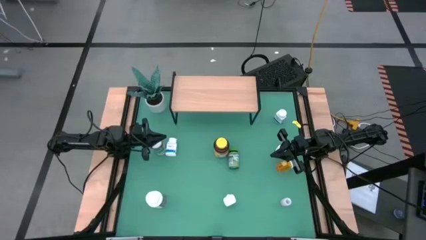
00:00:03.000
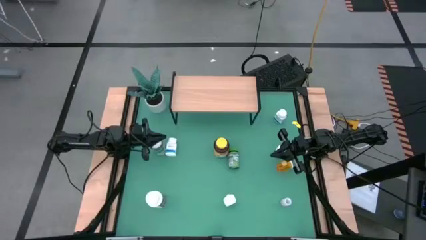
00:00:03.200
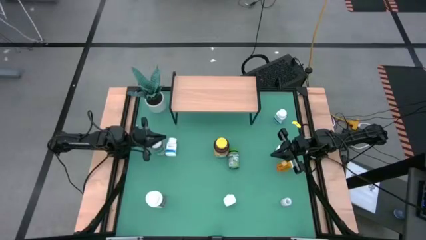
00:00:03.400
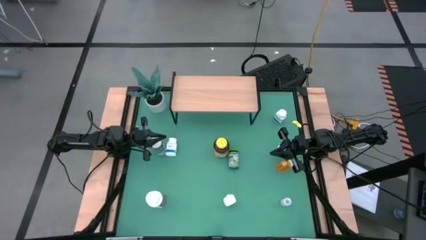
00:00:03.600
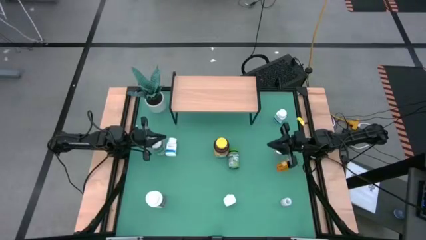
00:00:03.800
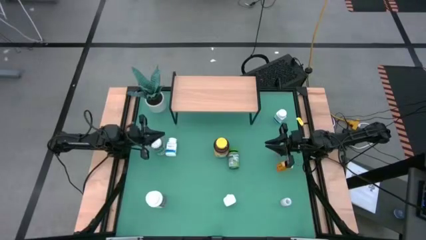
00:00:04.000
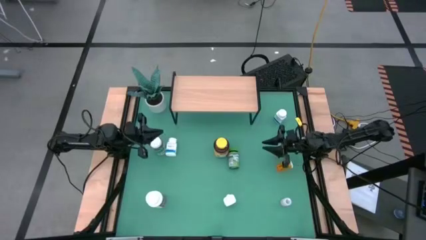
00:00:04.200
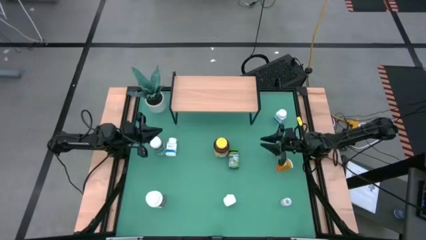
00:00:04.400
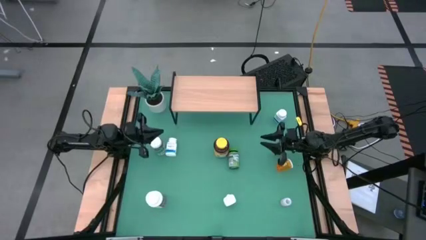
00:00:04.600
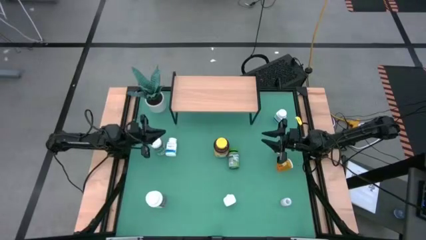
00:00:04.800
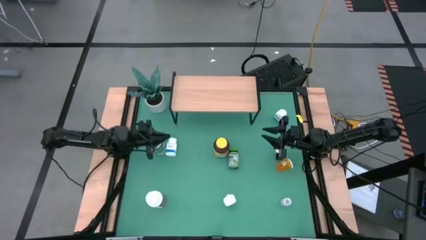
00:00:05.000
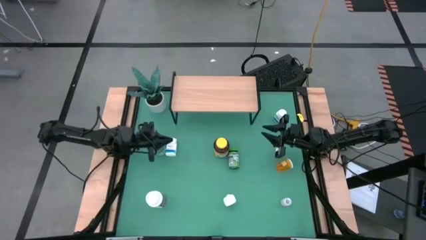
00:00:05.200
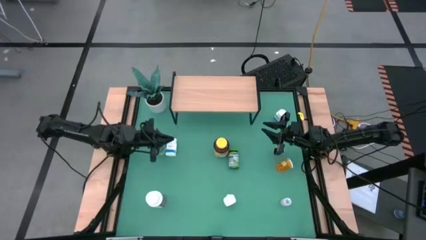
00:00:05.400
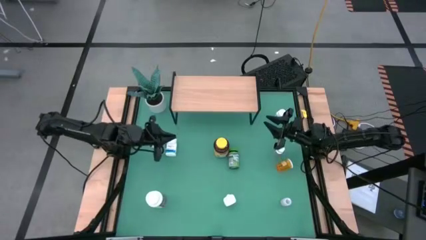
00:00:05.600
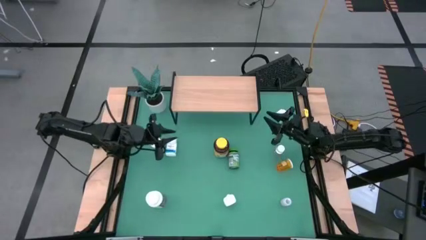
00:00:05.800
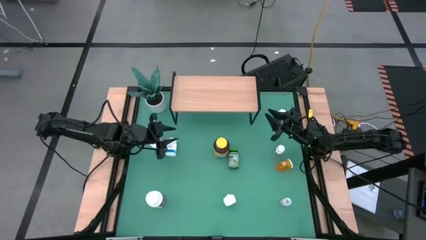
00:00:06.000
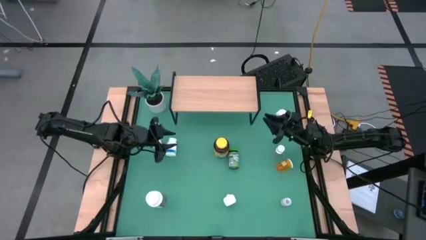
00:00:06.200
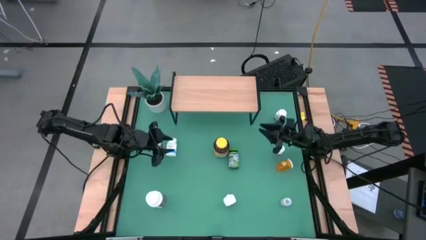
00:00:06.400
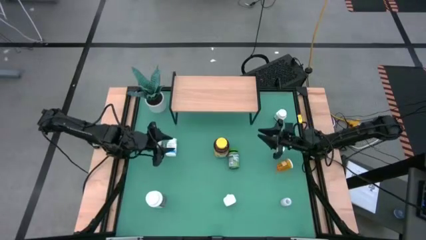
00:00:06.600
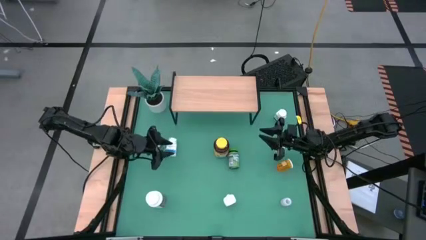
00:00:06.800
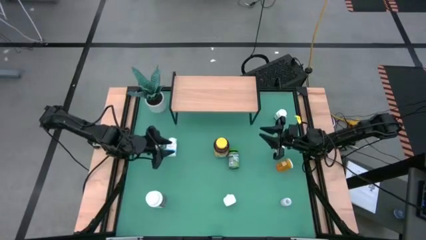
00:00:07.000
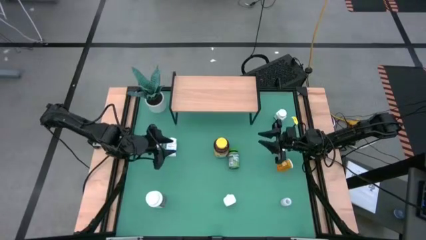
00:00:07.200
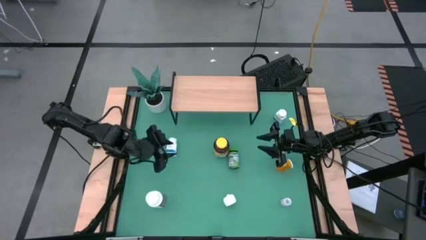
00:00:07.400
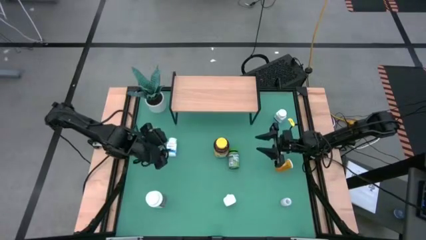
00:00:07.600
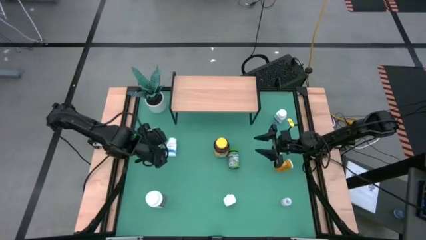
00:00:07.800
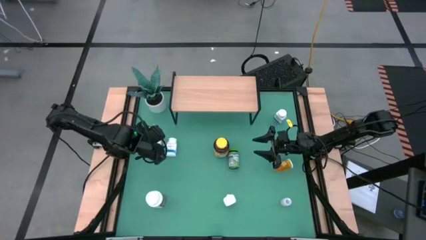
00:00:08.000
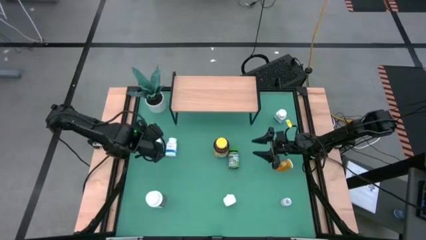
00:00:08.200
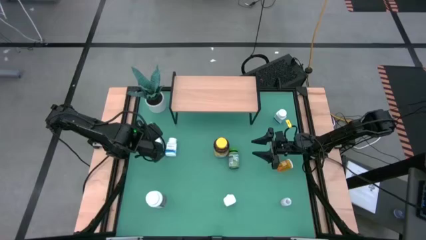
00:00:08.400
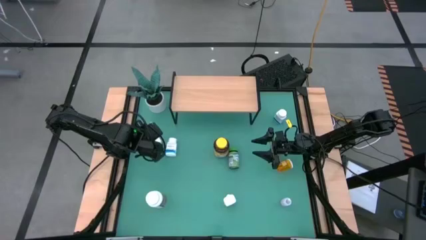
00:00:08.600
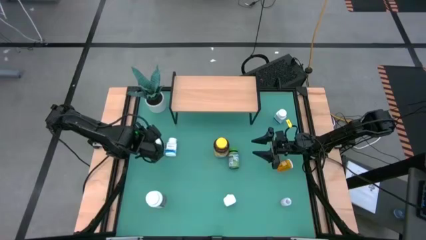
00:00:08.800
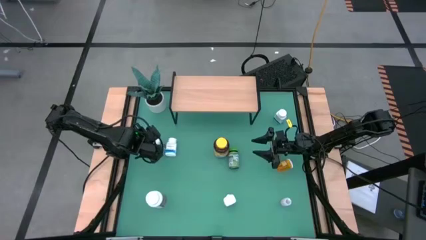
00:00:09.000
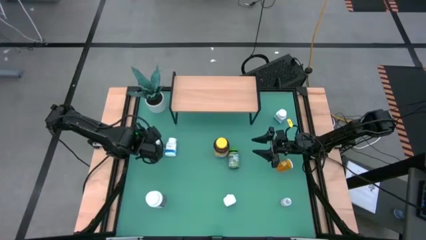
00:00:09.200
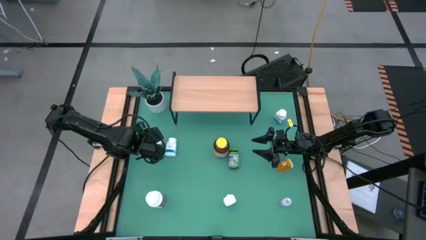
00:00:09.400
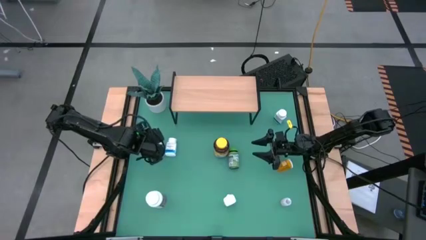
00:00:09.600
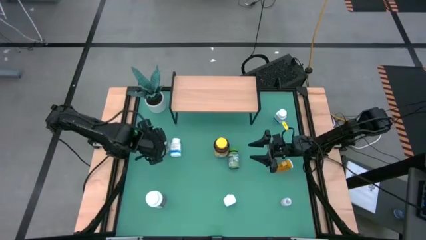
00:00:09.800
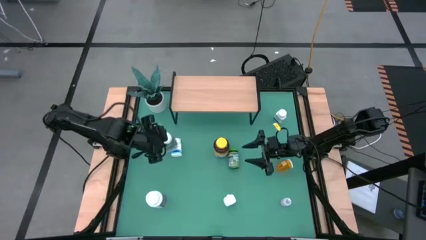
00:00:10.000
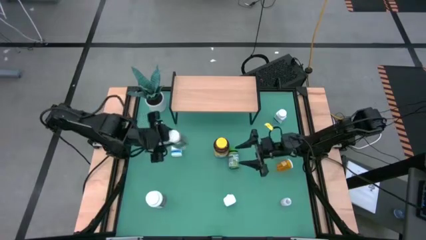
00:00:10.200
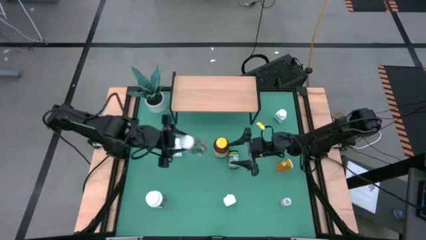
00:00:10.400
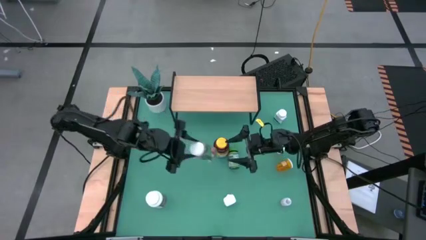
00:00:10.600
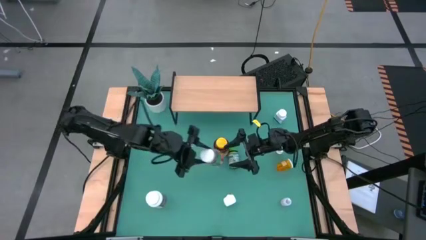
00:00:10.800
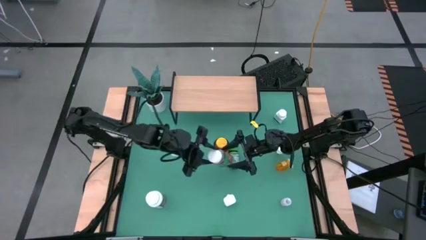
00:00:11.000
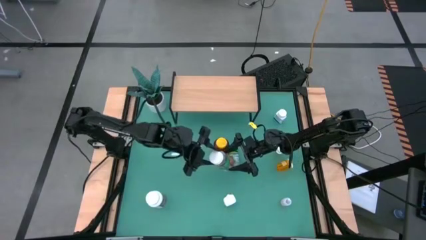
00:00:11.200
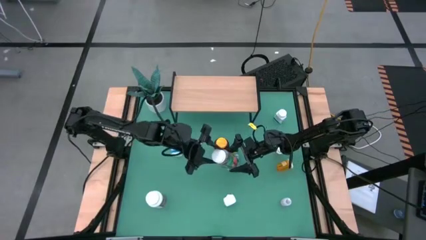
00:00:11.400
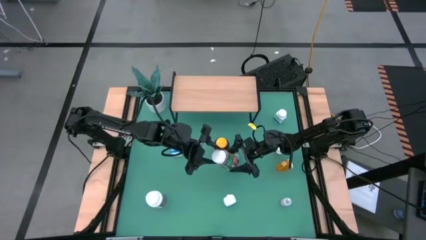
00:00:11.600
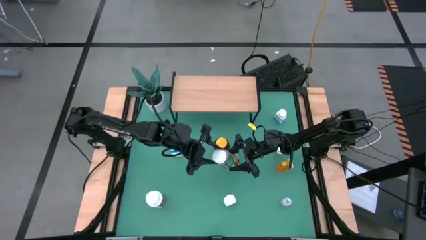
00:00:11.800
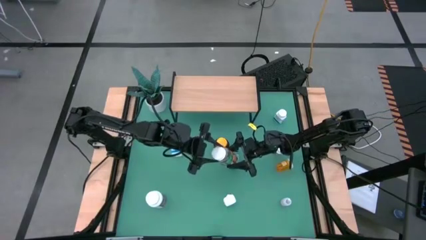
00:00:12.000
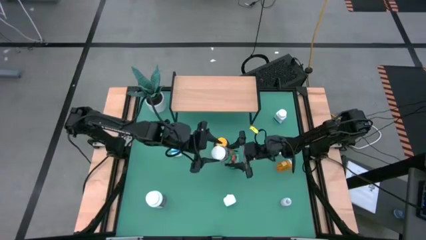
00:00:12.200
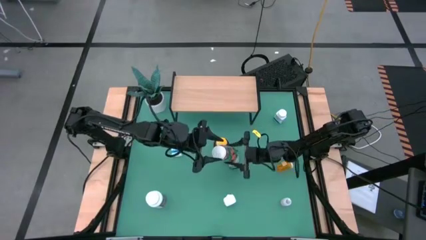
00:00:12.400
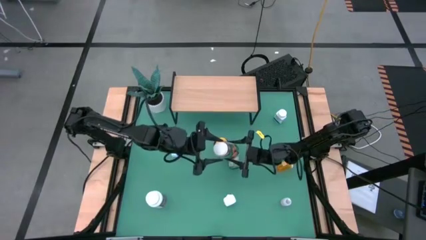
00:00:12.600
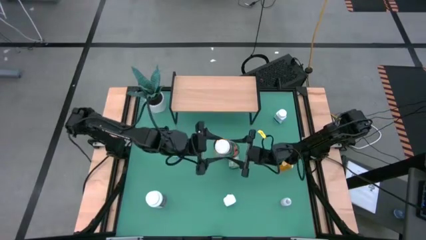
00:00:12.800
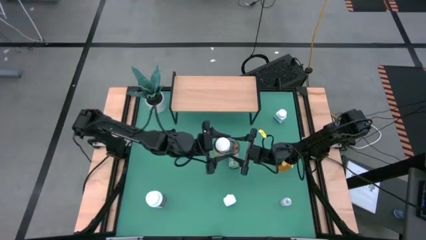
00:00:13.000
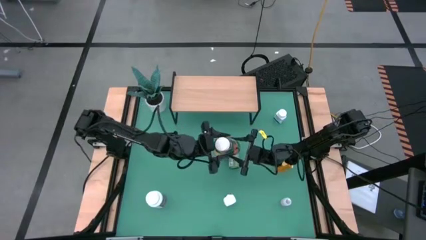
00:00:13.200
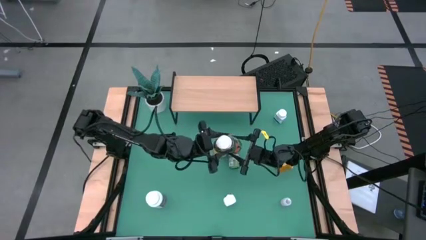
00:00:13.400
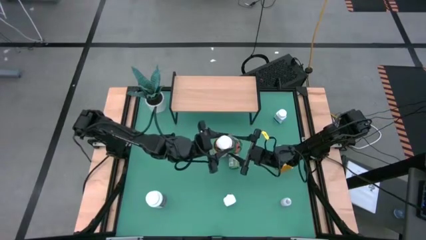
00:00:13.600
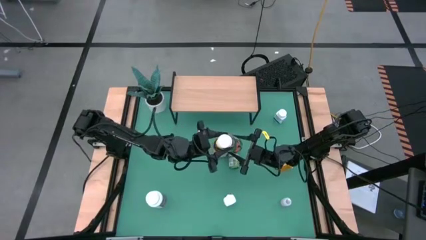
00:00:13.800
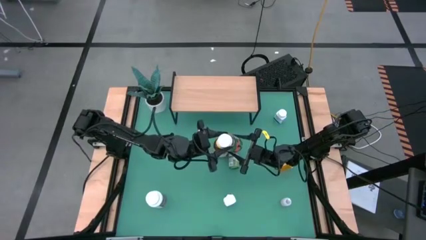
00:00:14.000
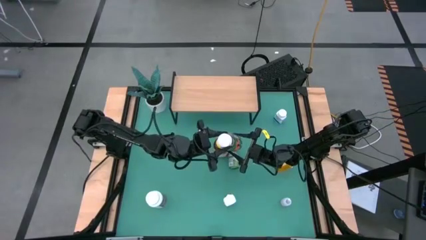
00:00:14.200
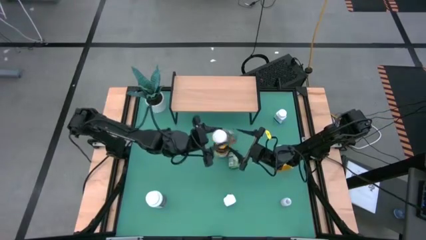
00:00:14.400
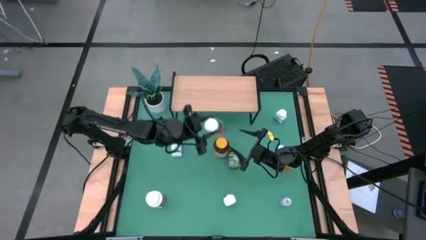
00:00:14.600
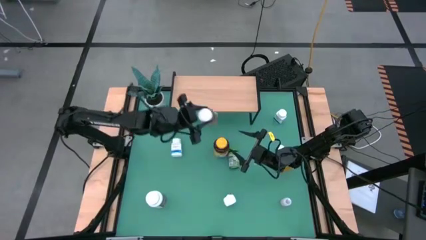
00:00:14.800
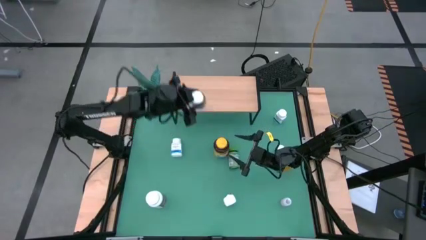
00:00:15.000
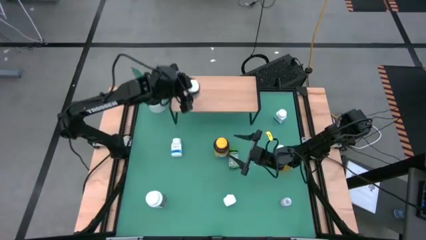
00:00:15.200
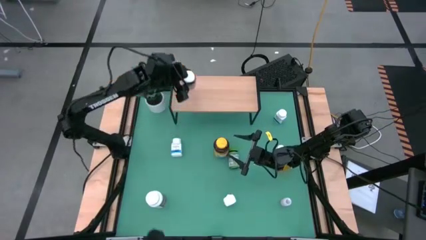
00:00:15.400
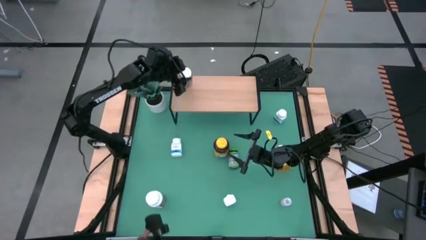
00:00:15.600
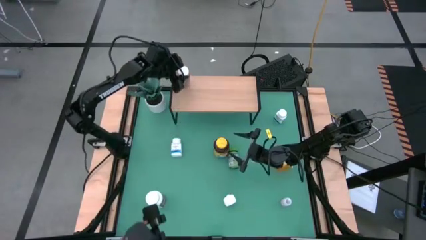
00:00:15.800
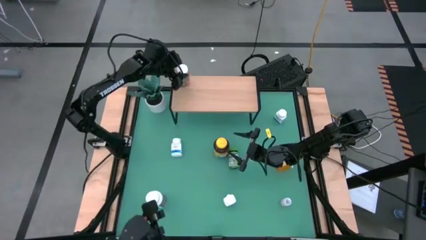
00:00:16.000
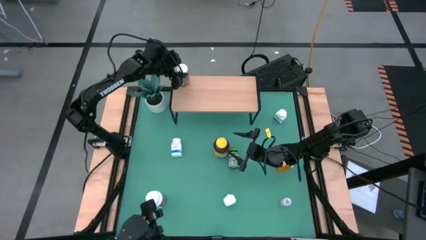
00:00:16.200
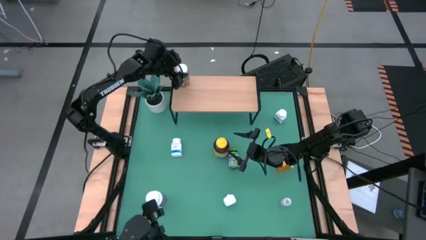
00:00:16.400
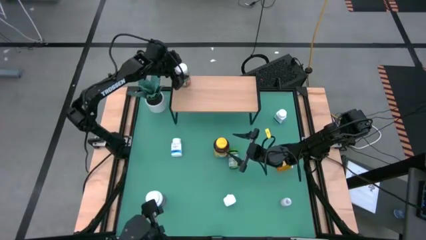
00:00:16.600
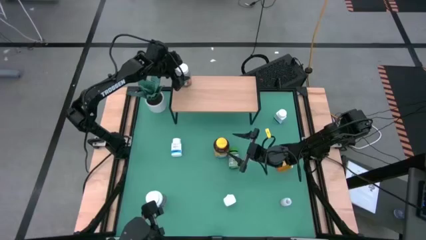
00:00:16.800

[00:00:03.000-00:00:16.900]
Task: Pick and place medicine bottles onto shelf by color
Put the green pill bottle on the shelf
